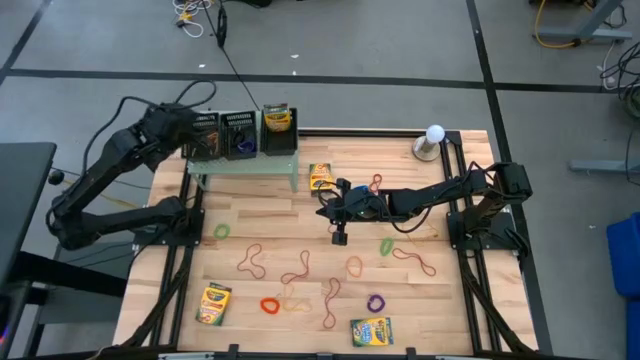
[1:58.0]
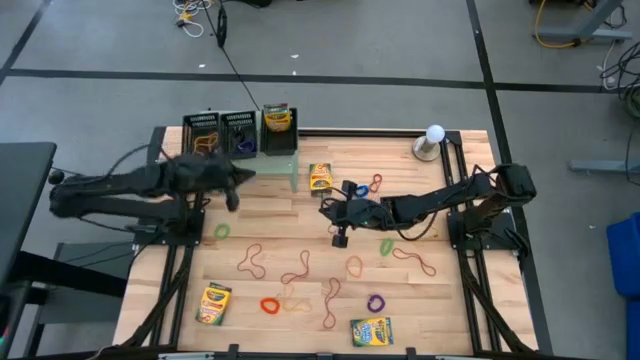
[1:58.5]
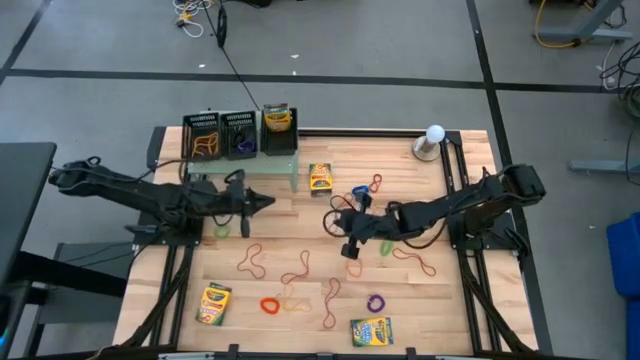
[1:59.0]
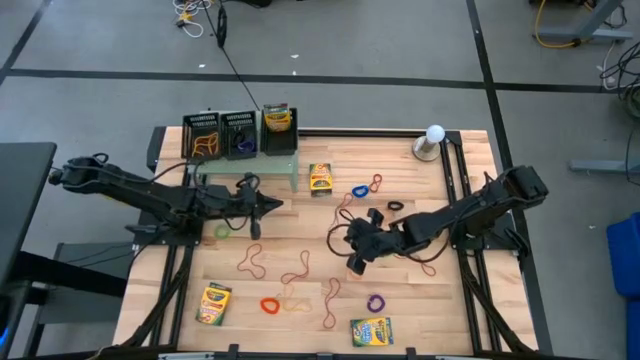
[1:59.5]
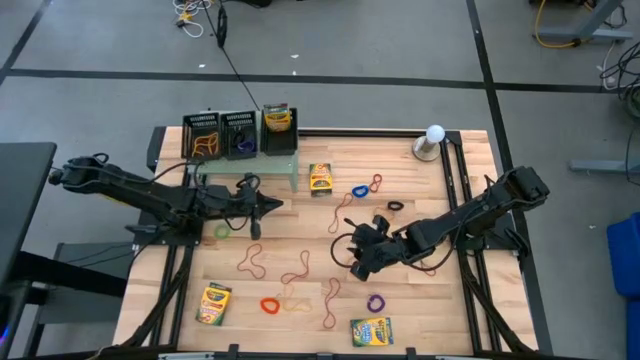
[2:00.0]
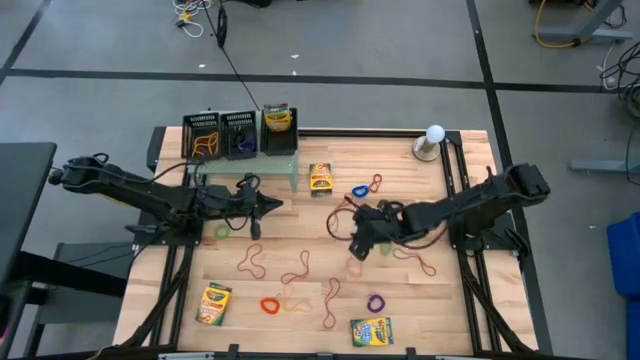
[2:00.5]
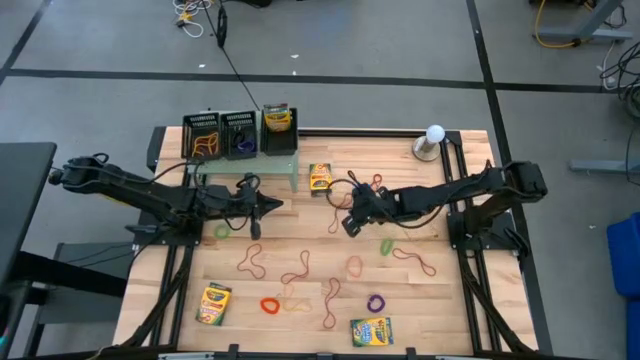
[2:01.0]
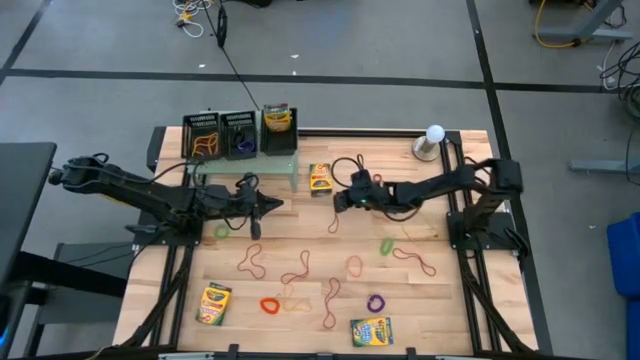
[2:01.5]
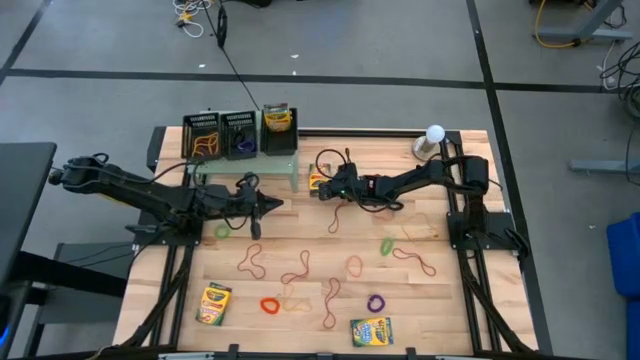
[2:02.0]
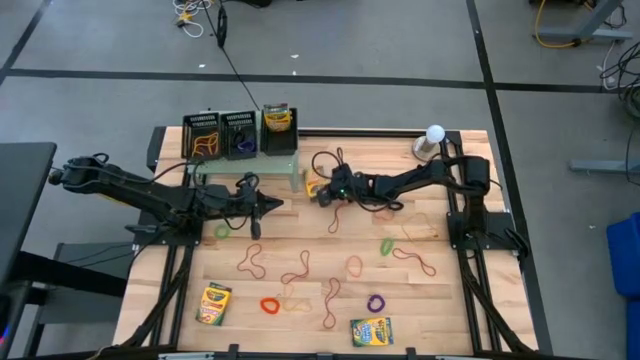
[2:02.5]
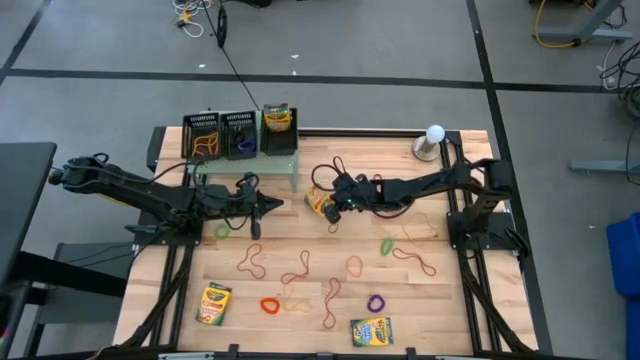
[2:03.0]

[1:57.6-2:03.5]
Task: Pick & Place Office Desk Supplies
Put the crayon box into the right black bin on the shelf

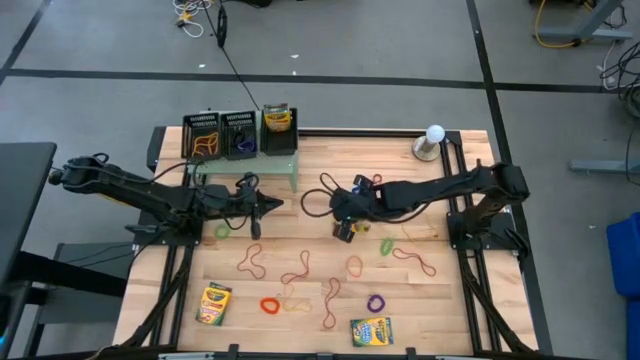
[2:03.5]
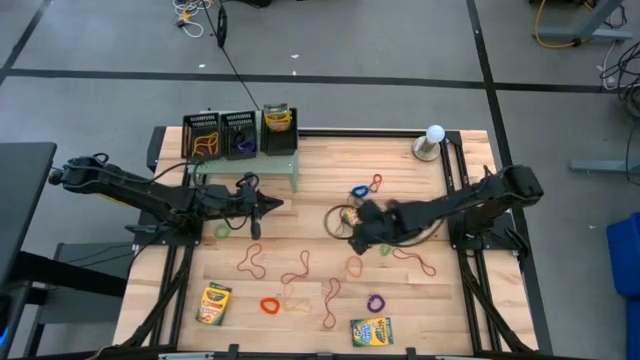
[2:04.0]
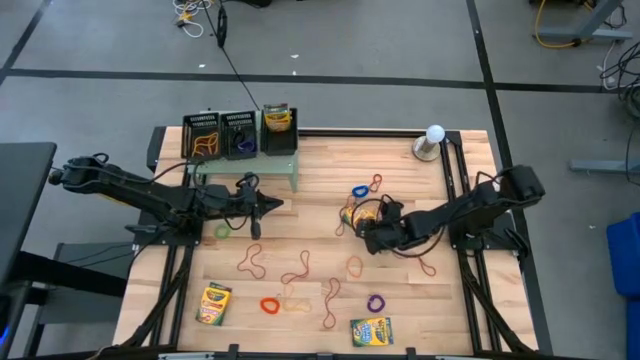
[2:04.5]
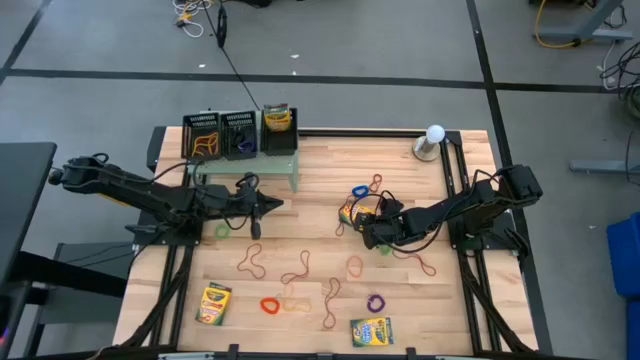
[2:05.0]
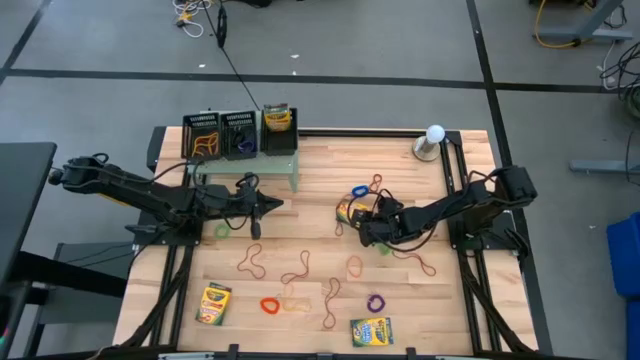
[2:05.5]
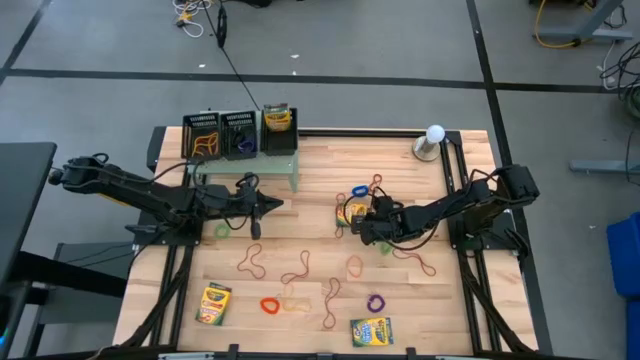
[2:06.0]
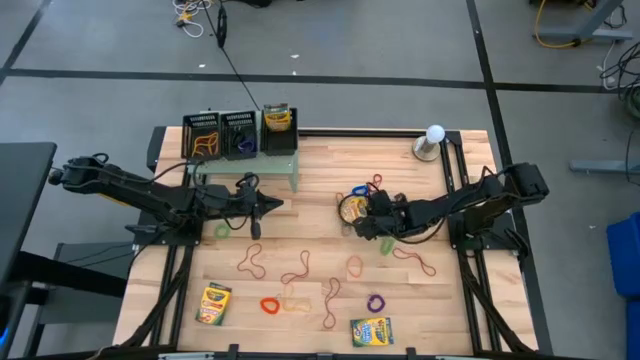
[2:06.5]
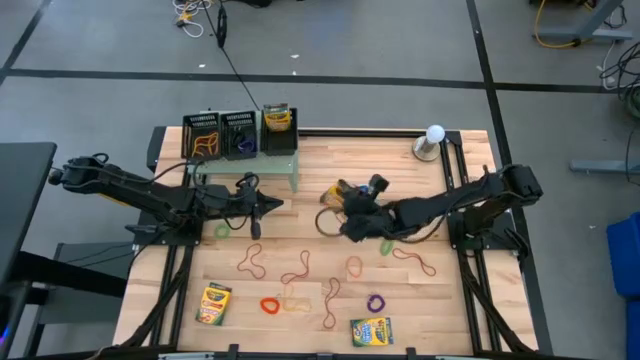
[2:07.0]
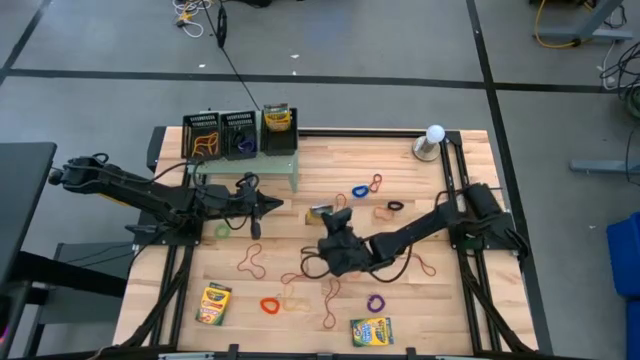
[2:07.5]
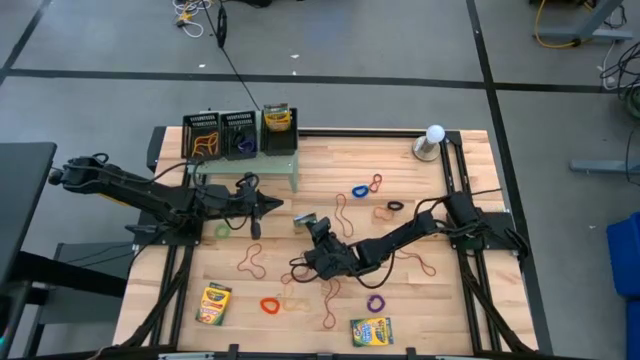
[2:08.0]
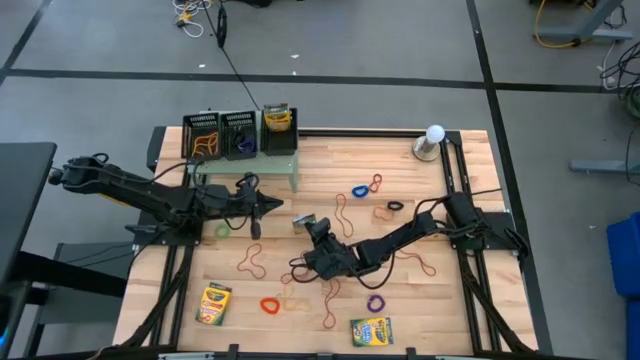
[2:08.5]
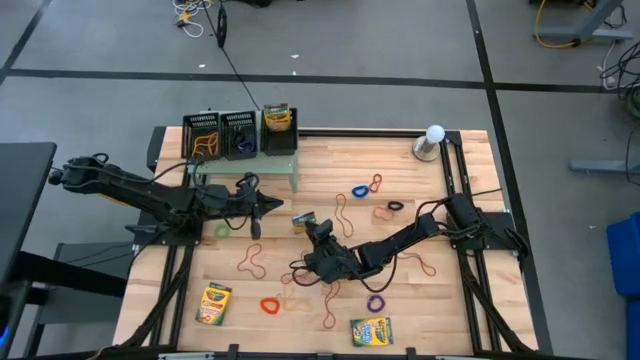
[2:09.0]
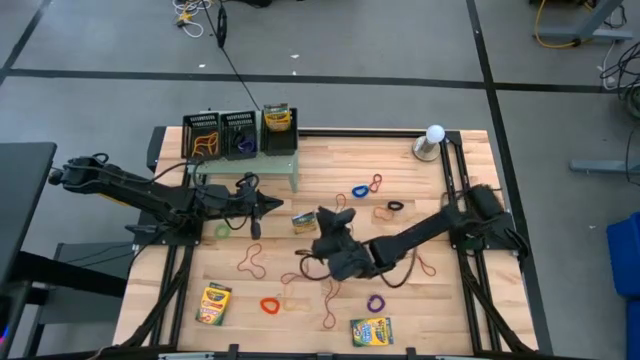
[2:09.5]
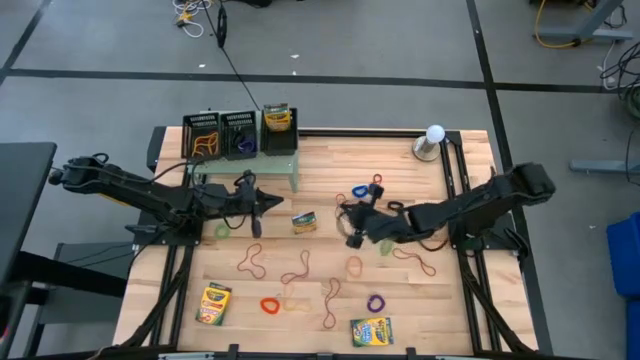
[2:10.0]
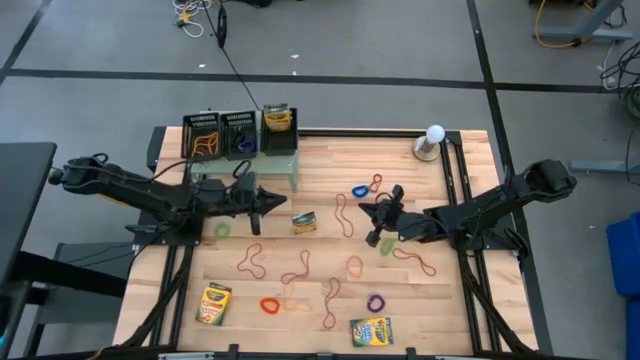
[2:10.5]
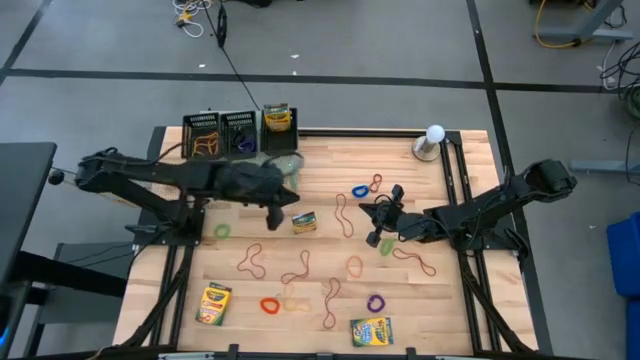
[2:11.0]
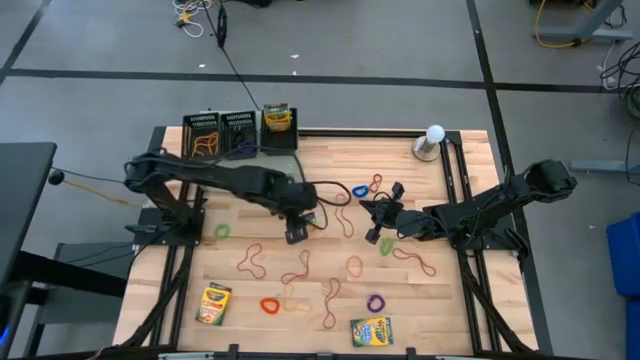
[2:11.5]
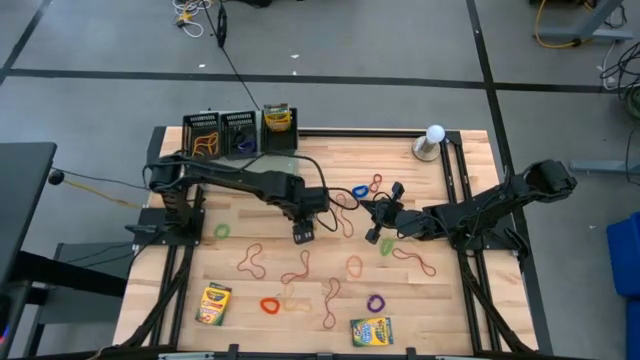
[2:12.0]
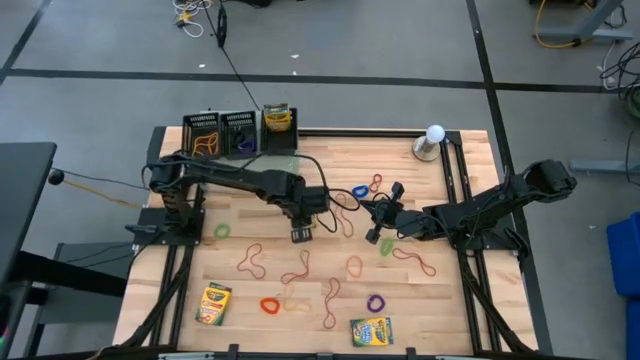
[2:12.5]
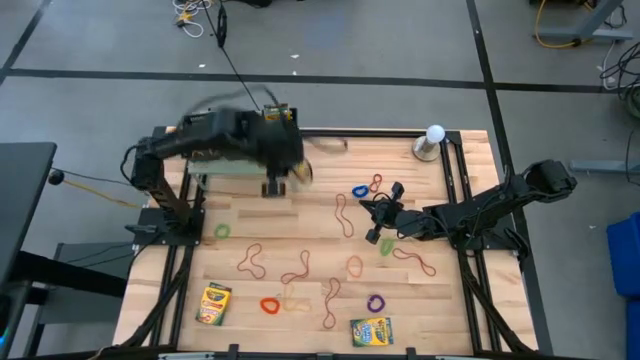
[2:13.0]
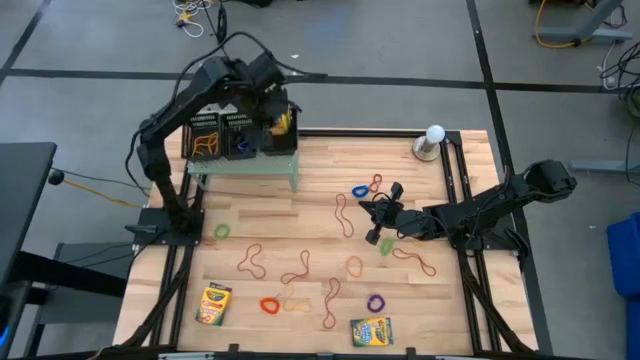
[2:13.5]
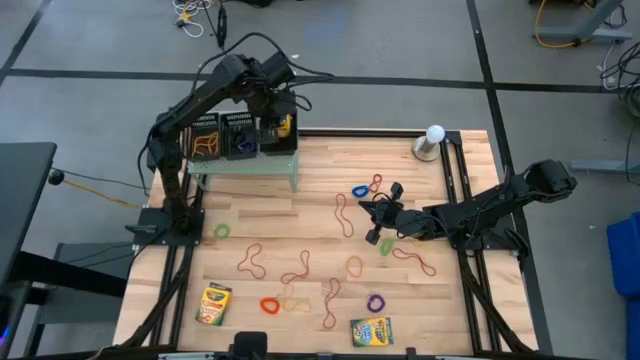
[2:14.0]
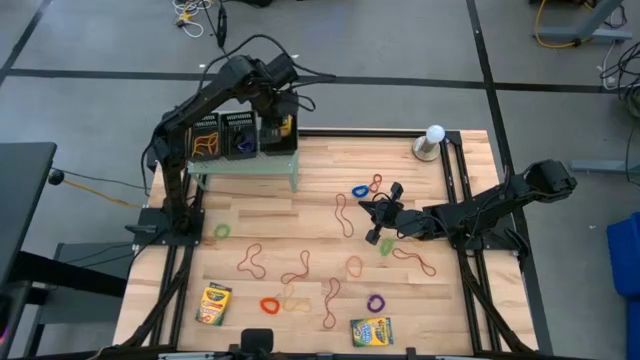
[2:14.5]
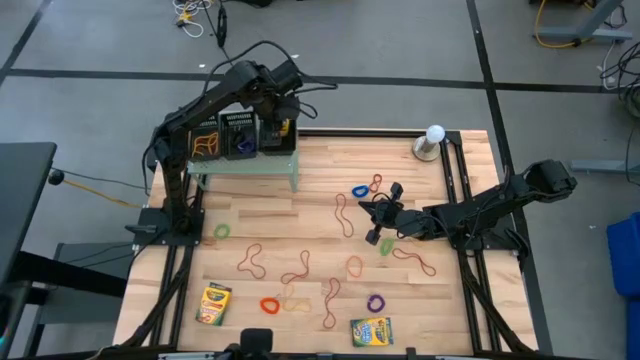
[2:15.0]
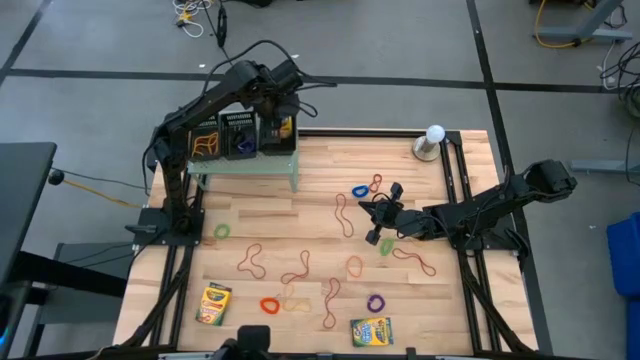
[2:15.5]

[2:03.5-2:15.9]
Put the crayon box into the right black bin on the shelf

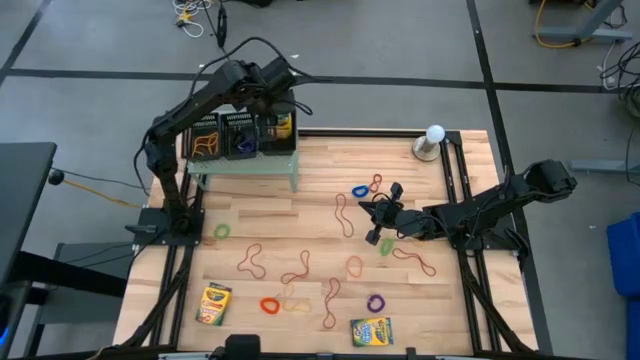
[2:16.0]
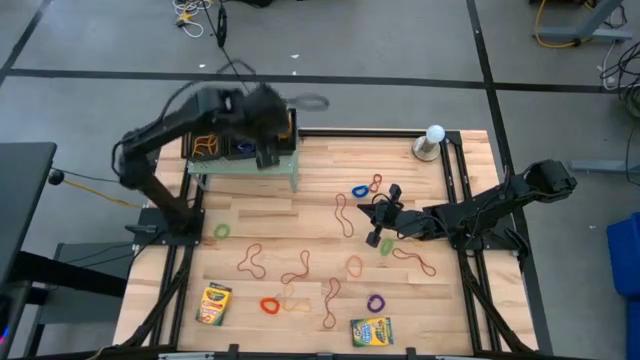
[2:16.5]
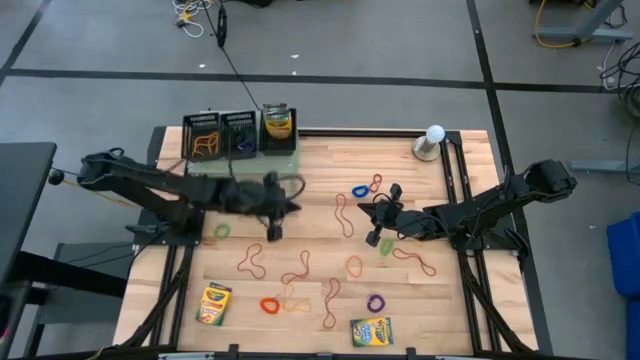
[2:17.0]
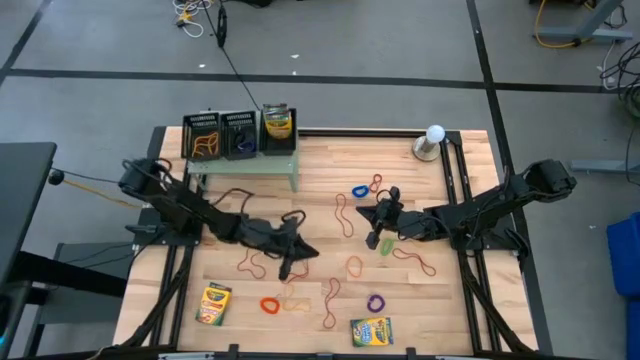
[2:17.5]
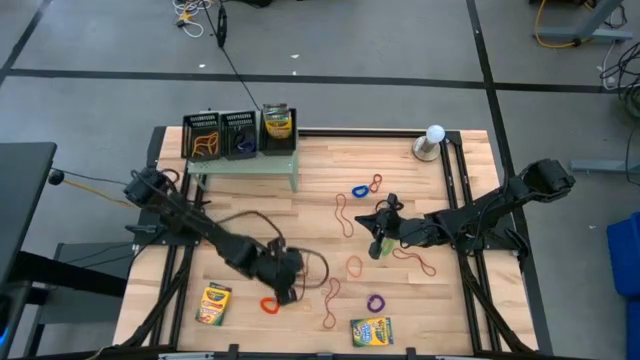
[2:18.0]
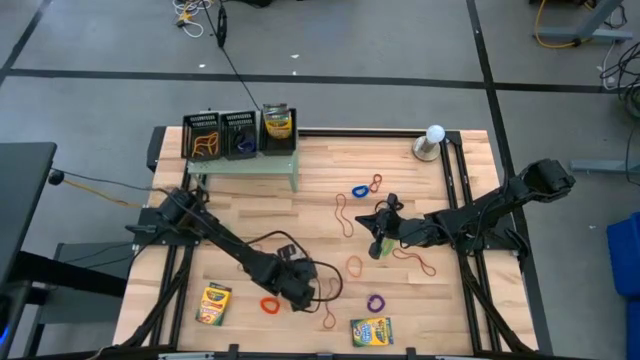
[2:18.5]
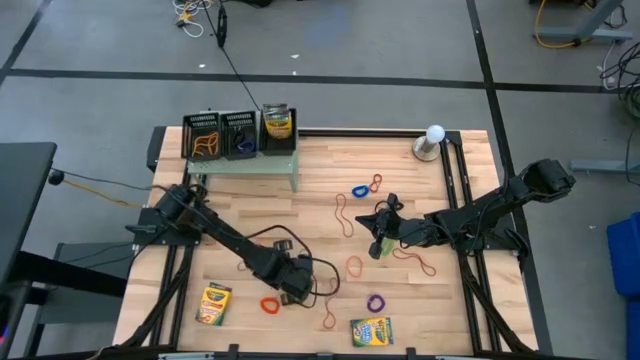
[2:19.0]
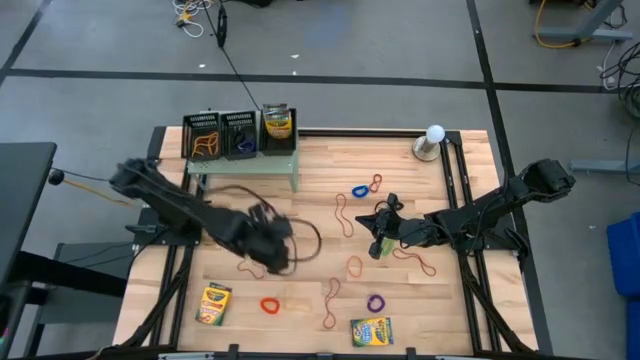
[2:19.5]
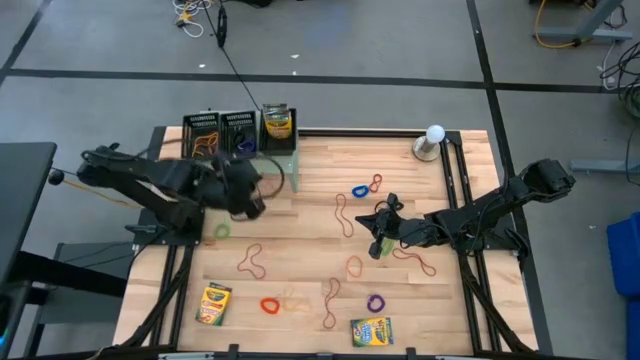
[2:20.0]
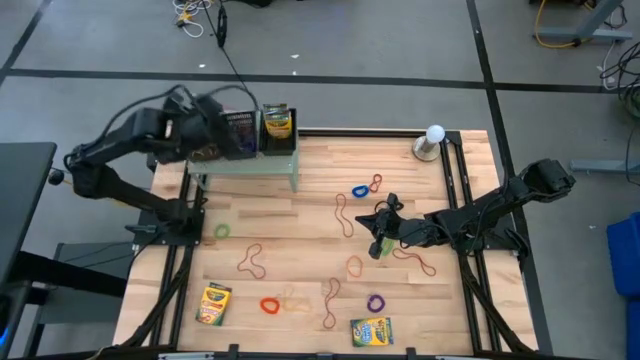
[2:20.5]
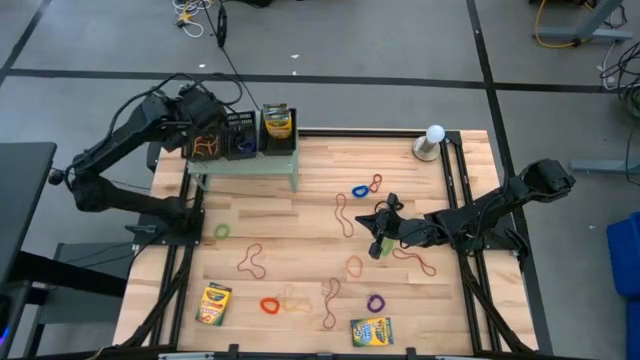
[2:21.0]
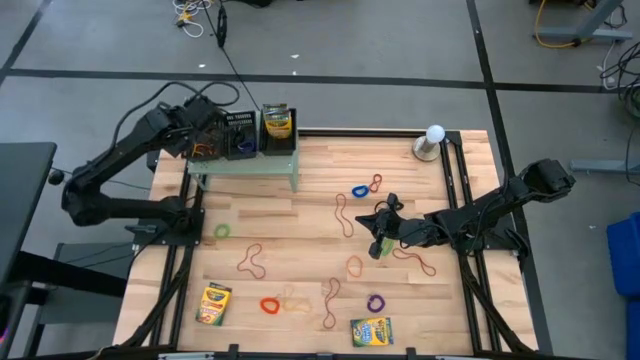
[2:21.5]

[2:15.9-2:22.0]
Put the red rubber band into the left black bin on the shelf
